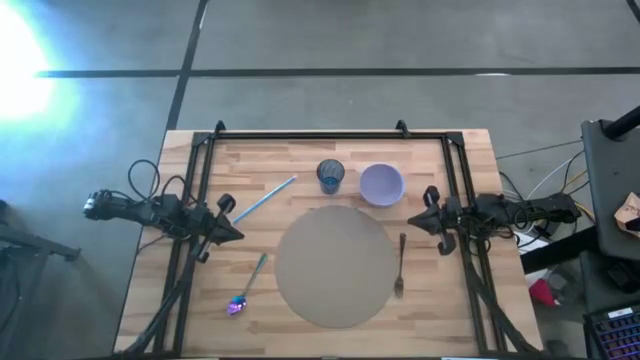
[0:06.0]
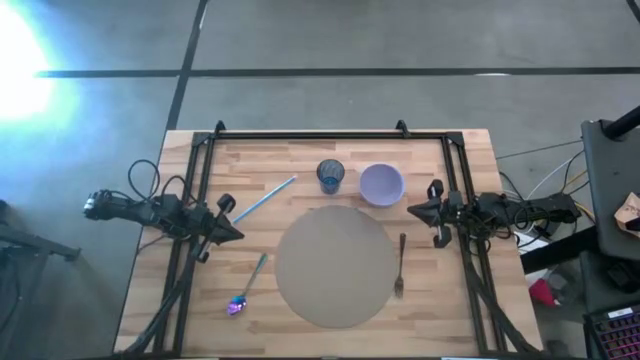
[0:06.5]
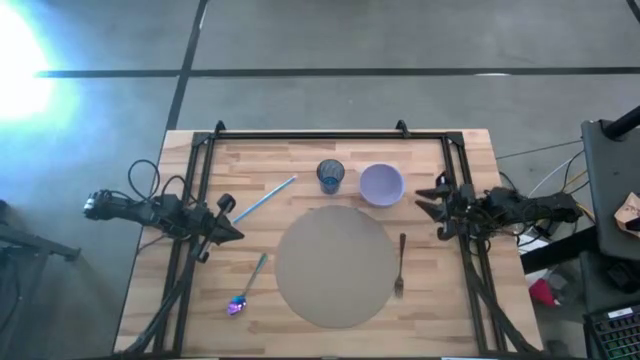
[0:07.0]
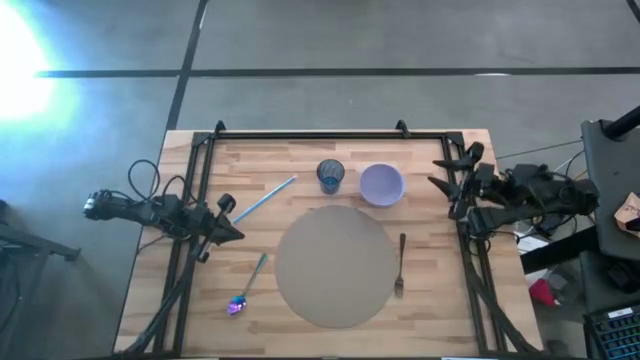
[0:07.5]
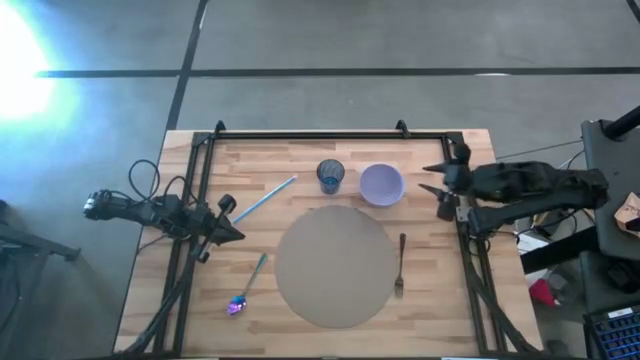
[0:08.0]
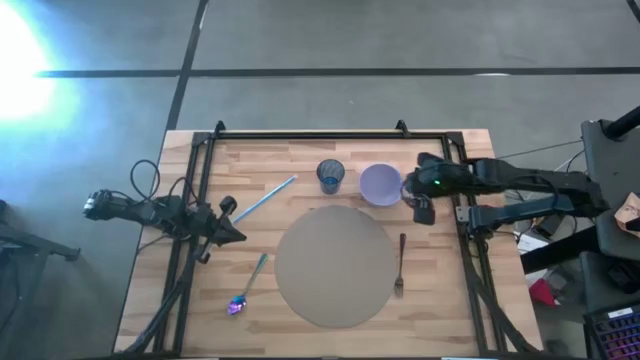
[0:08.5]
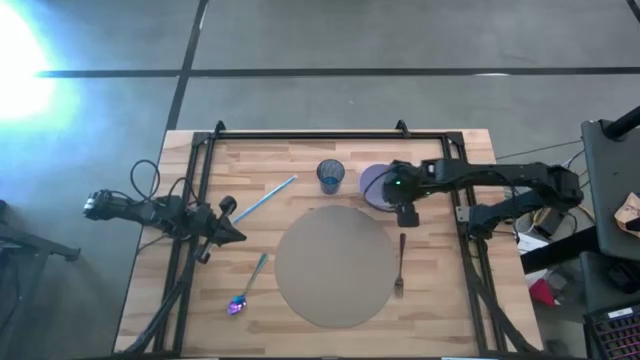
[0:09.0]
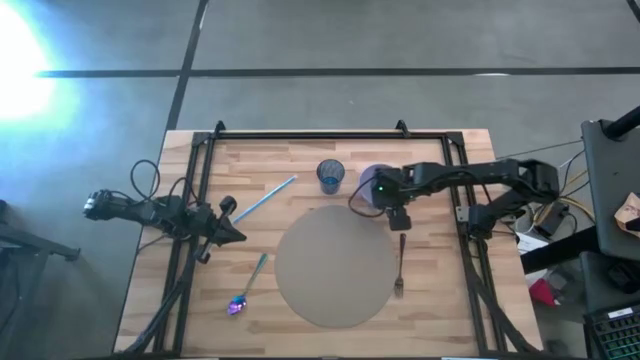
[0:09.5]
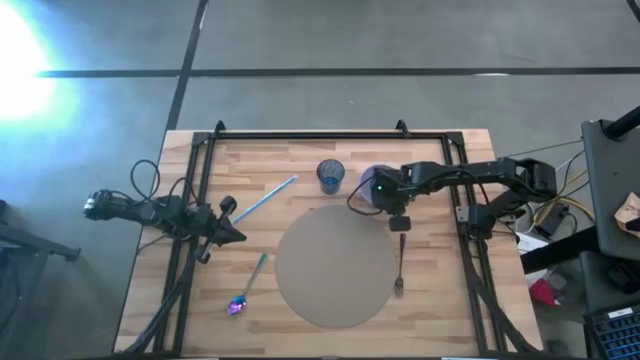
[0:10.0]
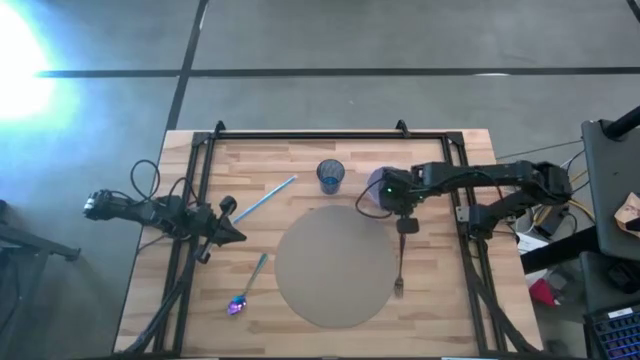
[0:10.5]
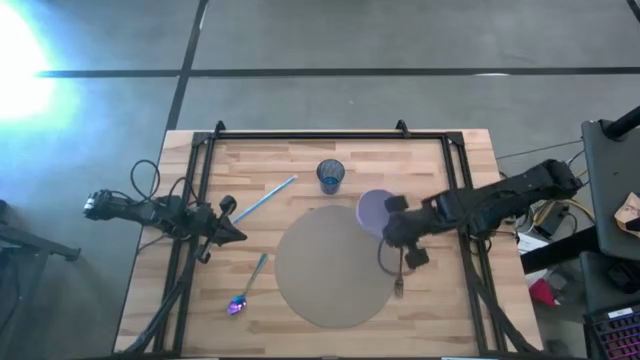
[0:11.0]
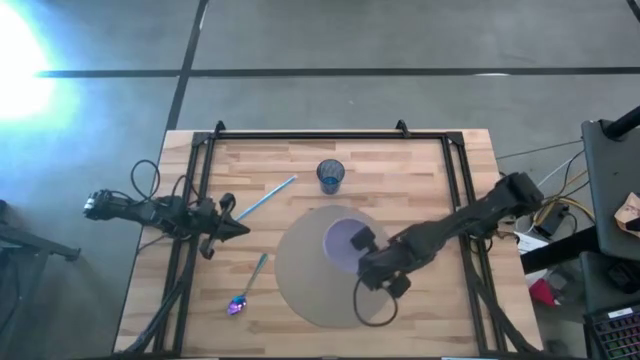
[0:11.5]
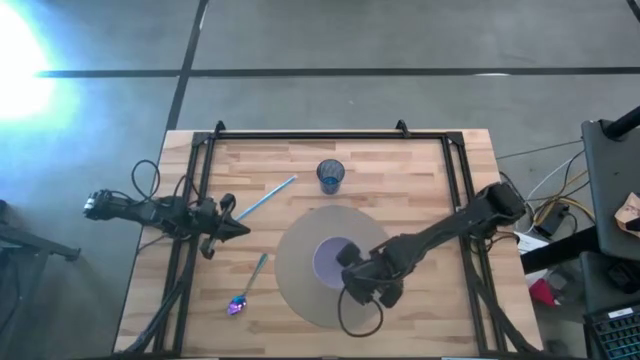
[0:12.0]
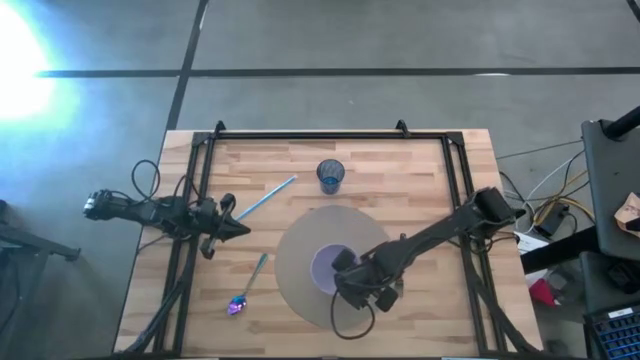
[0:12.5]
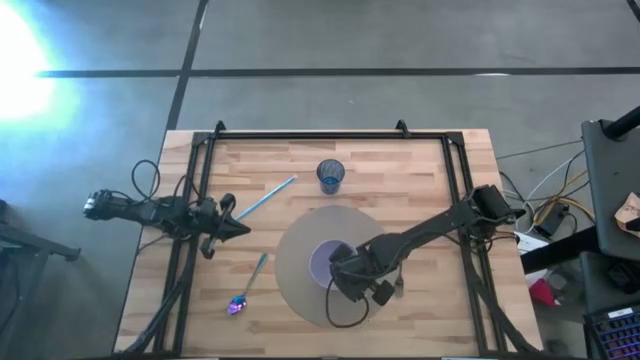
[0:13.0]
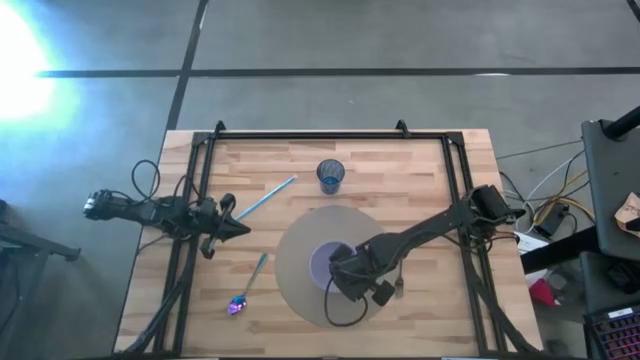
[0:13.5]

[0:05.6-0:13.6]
Task: Pick & Place Utensil
Put the violet bowl on the brown mat

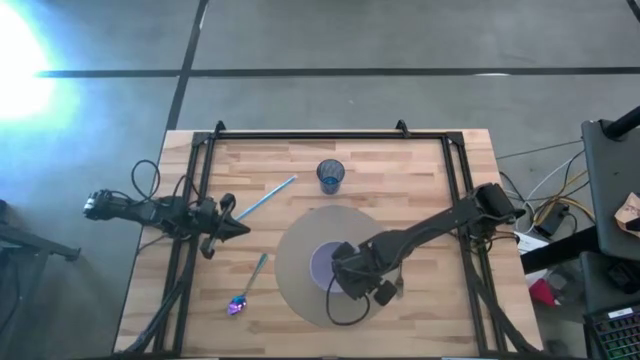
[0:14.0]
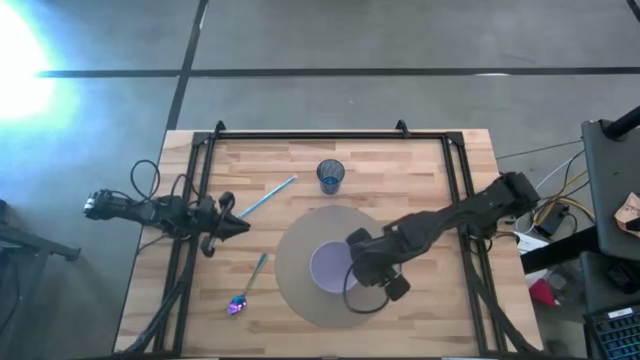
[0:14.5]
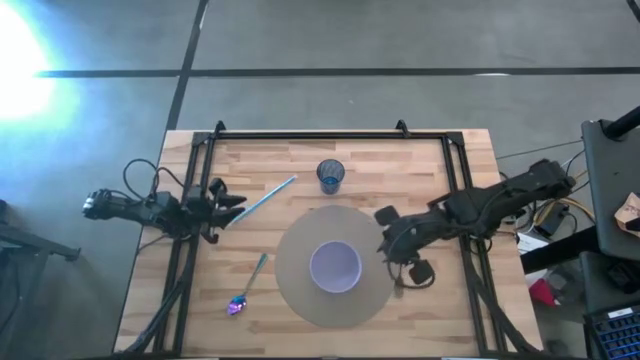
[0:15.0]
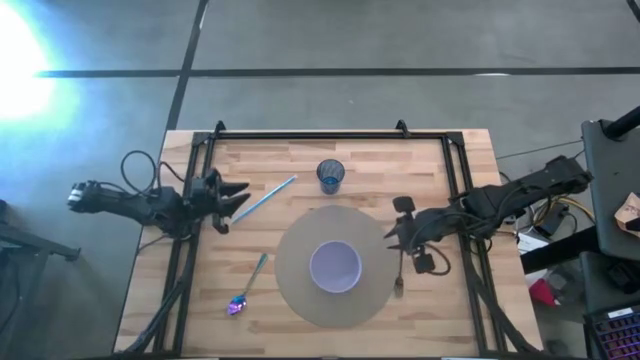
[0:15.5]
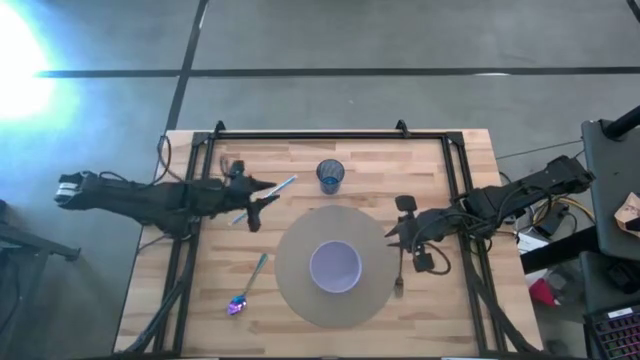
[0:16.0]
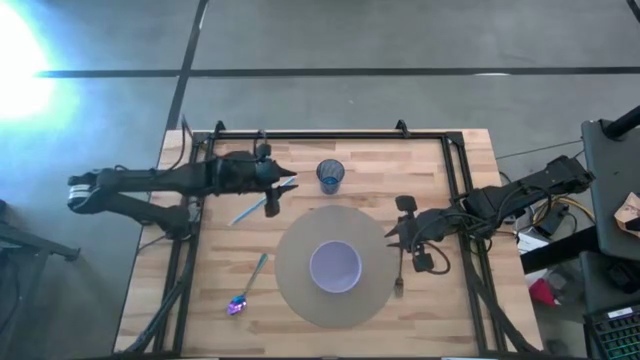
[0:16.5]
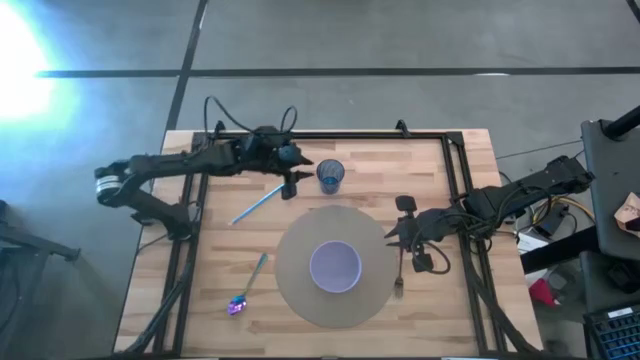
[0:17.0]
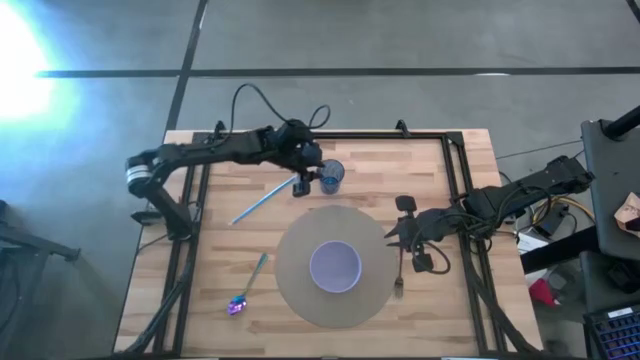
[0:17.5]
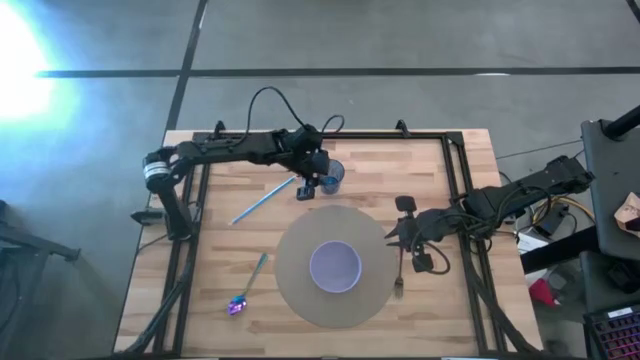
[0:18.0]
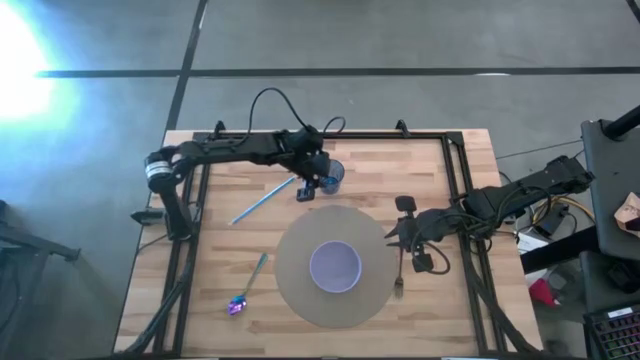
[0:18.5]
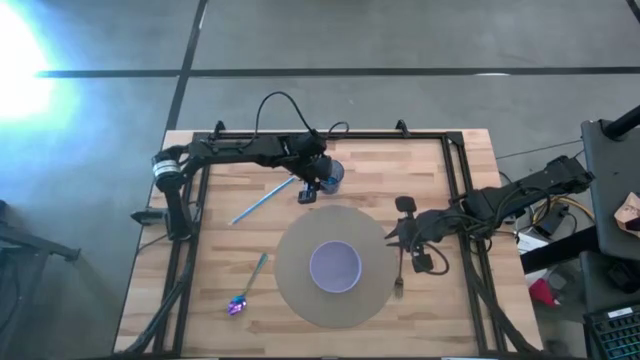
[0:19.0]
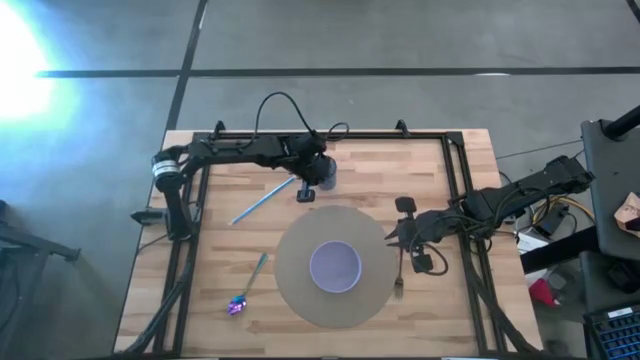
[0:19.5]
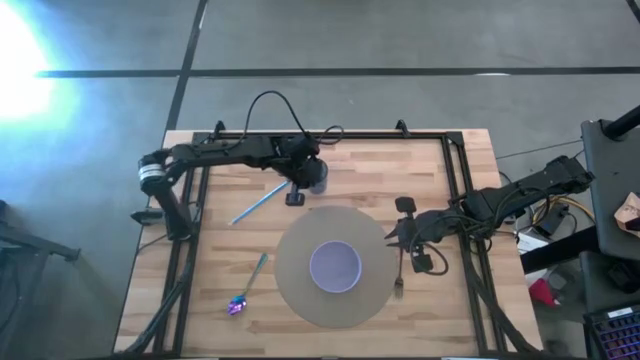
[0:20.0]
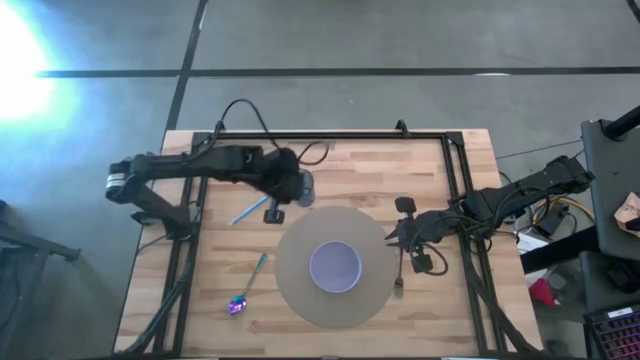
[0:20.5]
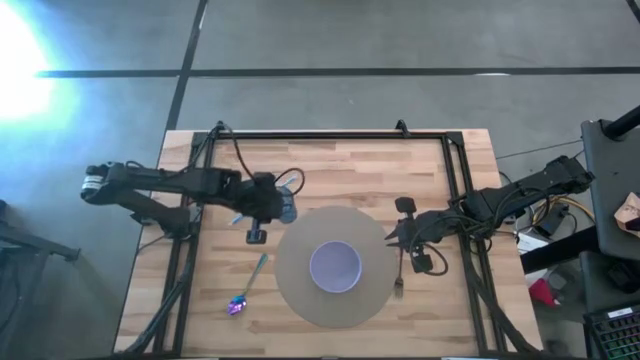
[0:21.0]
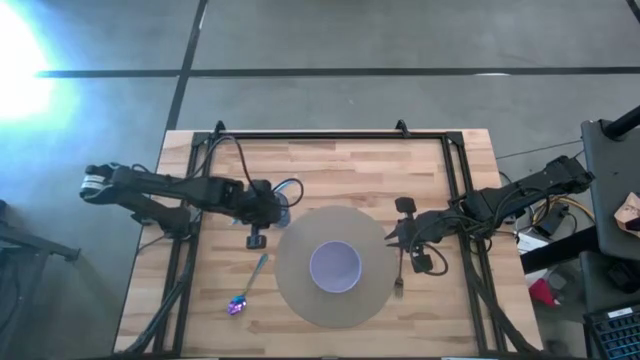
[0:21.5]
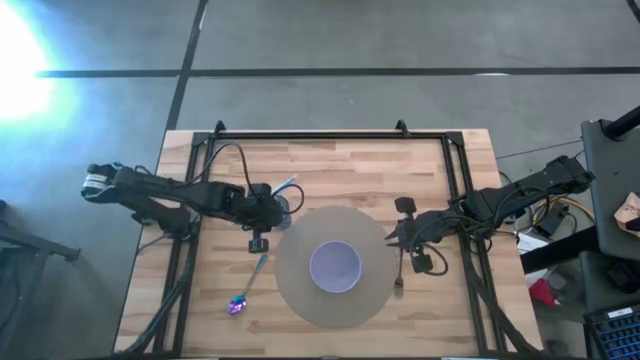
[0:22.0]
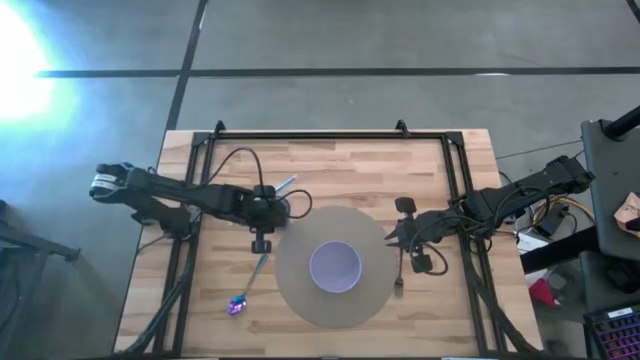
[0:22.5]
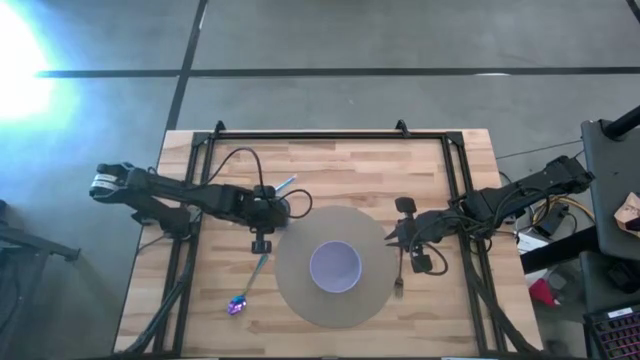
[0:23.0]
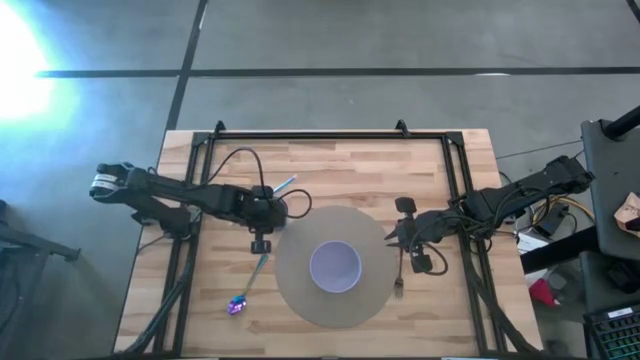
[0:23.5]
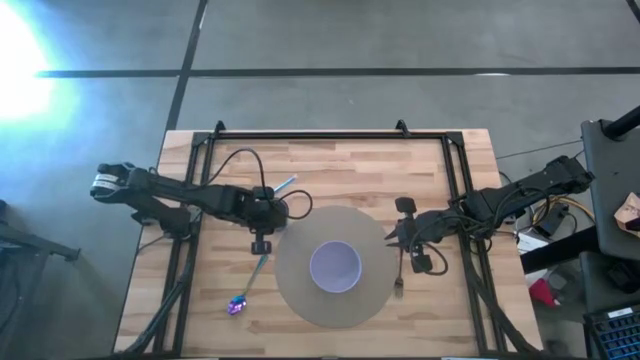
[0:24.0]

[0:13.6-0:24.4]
Move the blue cup to the top left of the brown mat
